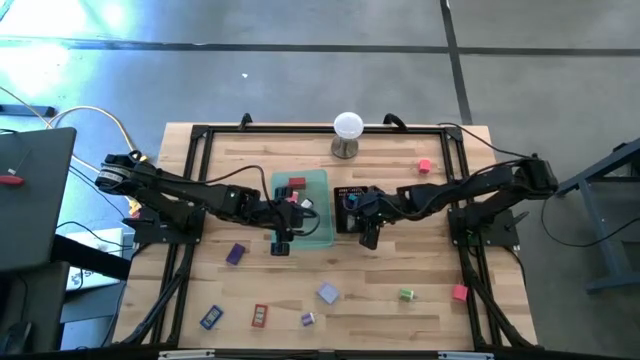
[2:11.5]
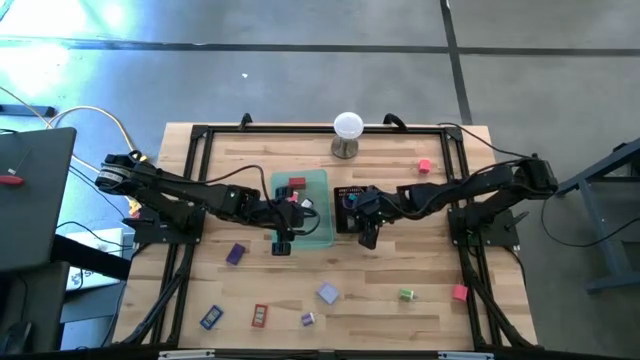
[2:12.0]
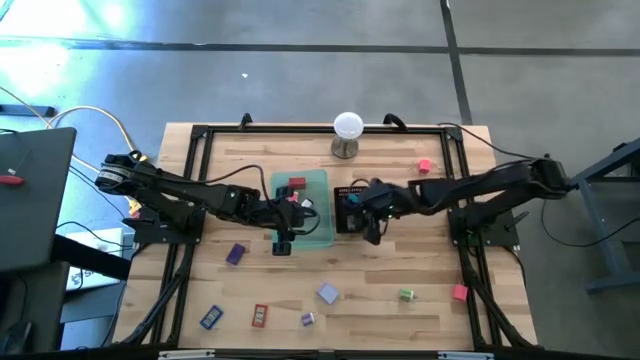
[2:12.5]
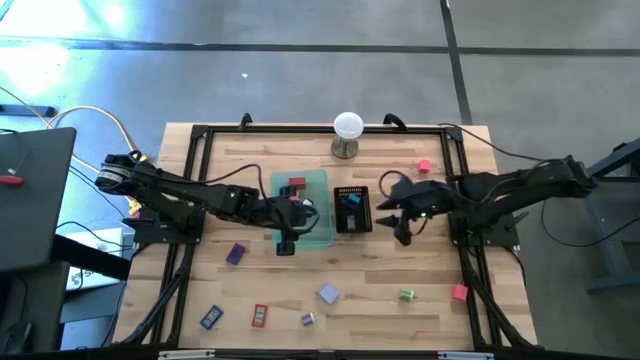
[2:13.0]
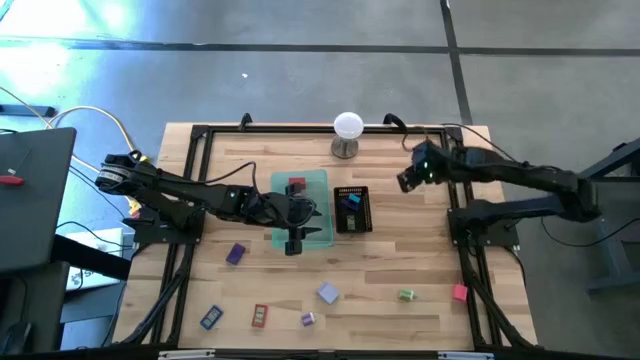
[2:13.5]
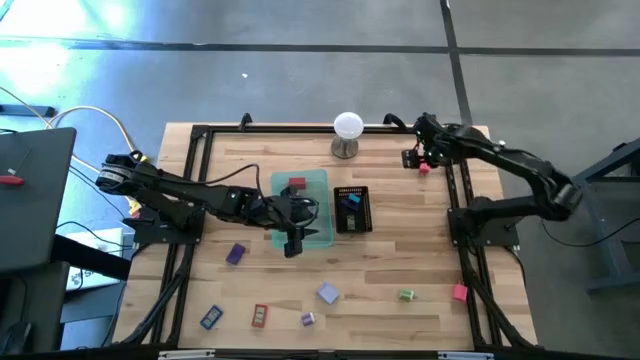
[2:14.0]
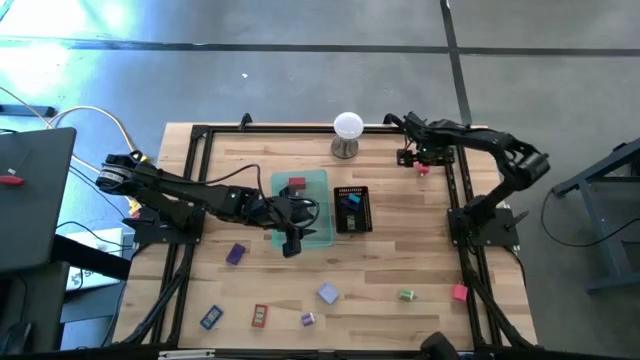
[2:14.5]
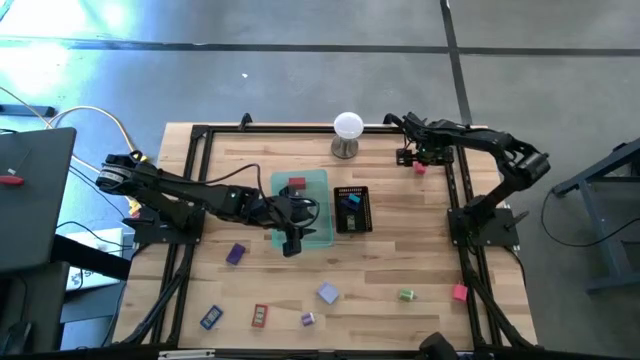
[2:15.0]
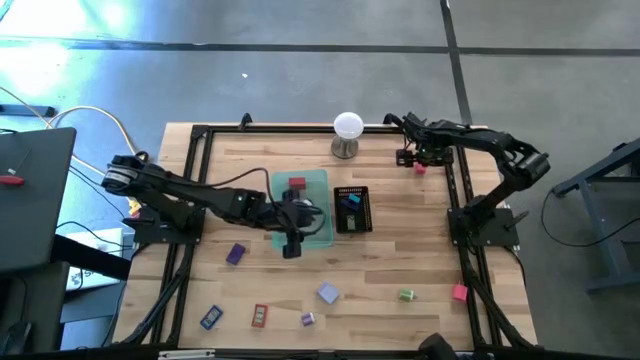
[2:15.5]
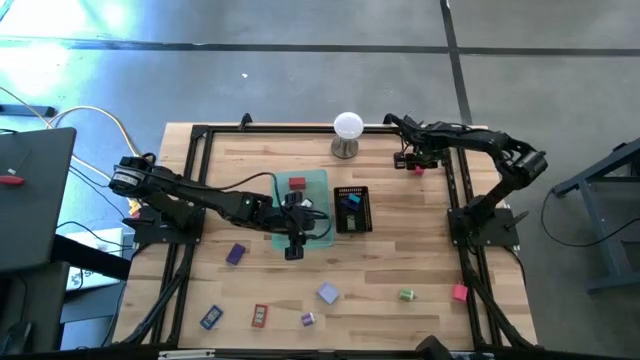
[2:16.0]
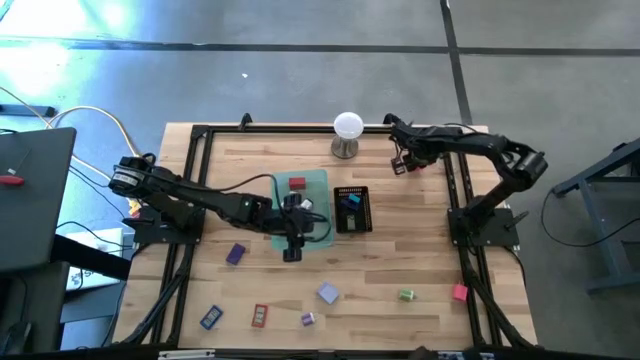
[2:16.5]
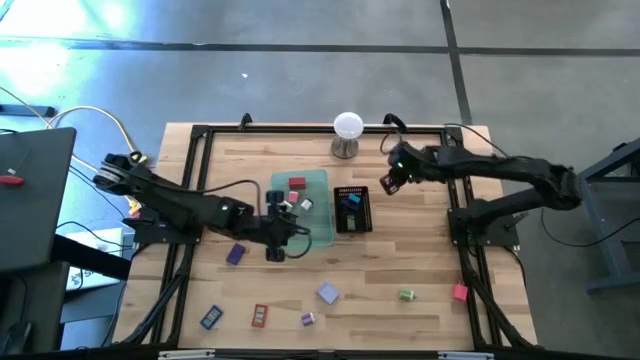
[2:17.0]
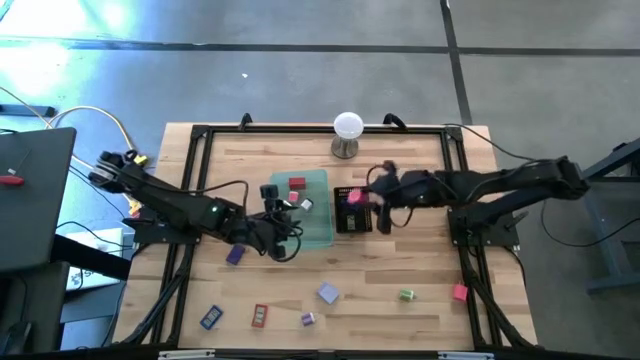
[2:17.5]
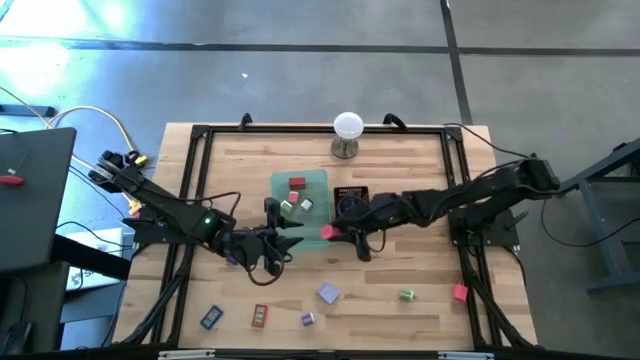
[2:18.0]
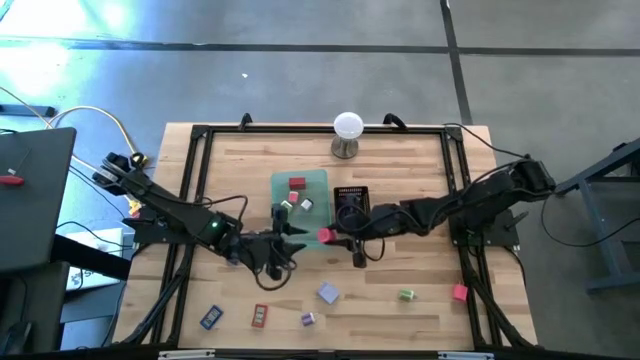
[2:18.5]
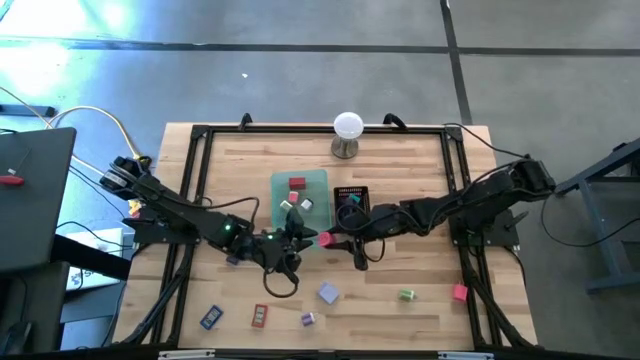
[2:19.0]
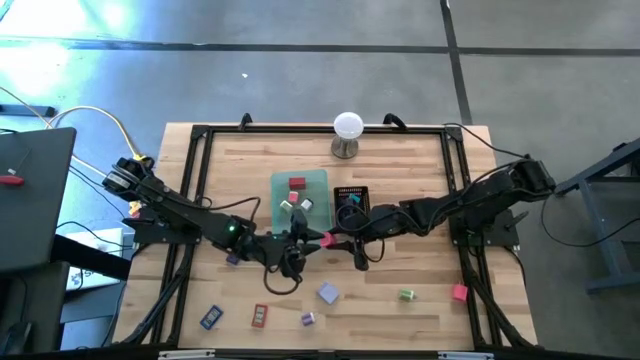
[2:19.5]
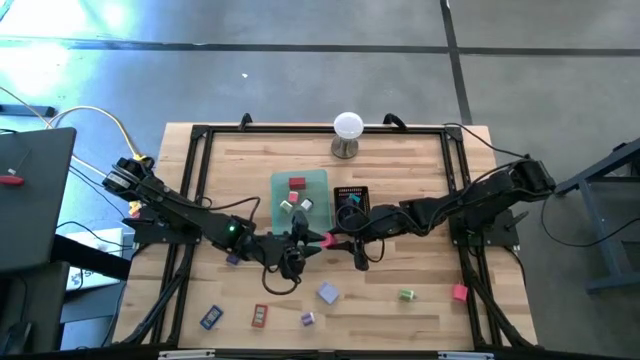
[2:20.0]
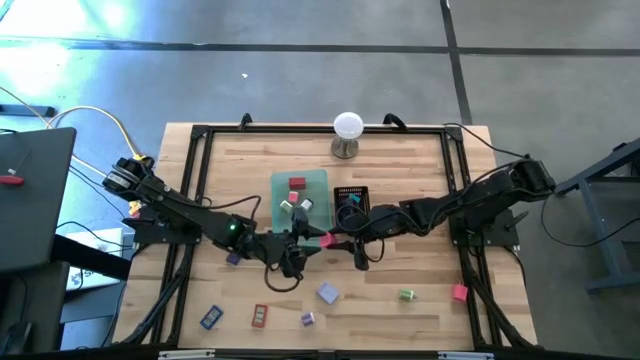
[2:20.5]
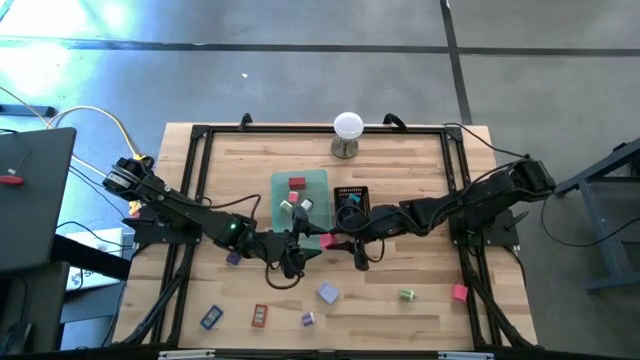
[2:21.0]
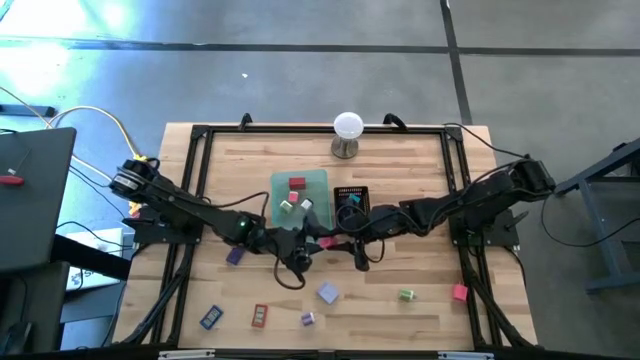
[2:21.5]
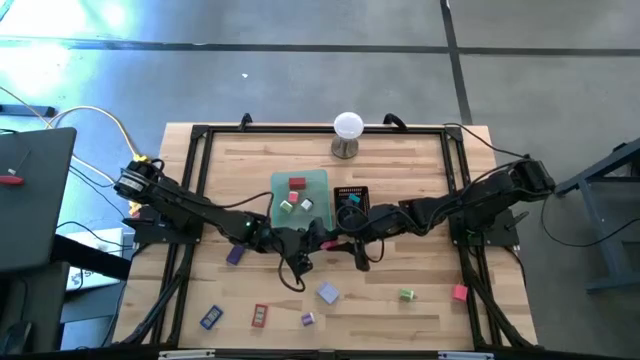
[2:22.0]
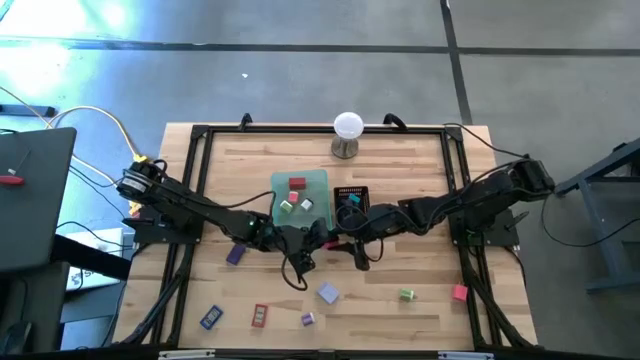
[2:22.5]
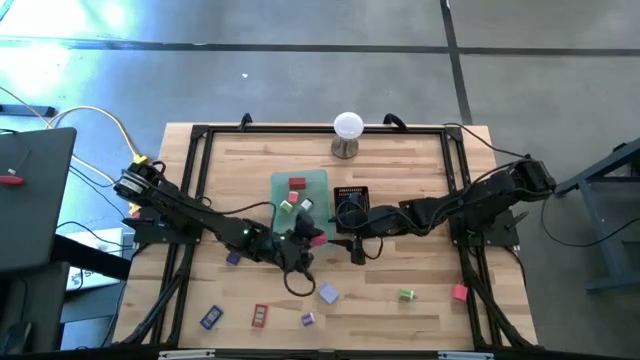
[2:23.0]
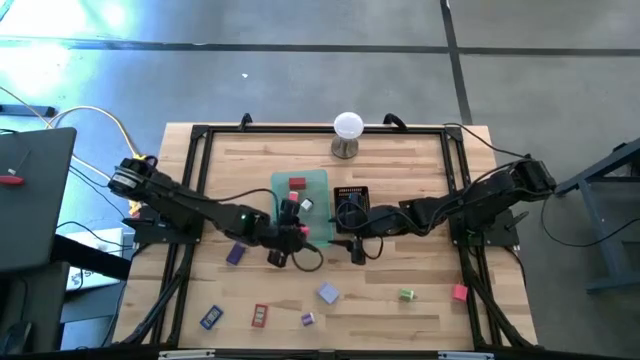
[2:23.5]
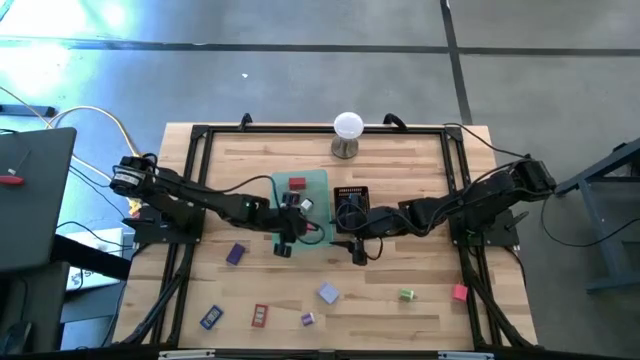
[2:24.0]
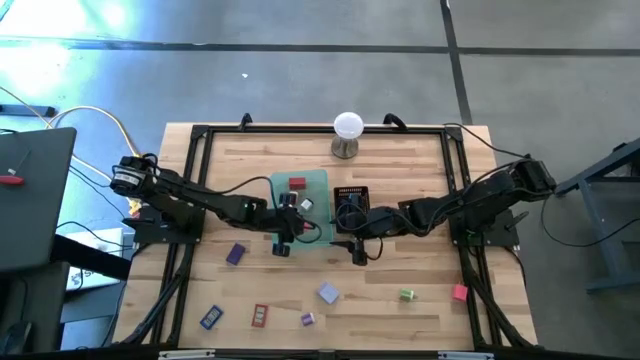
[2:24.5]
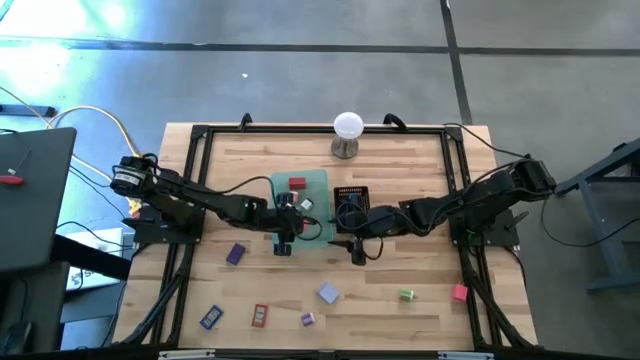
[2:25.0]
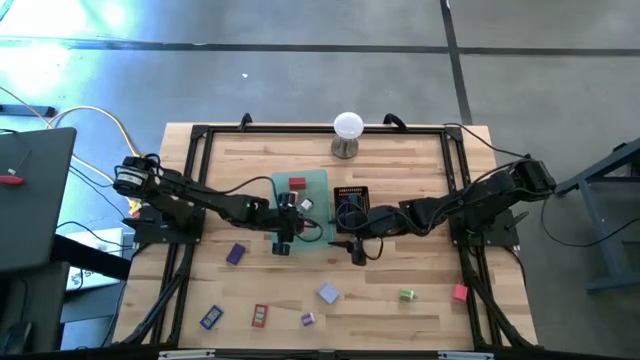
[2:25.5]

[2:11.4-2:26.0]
Task: Pick & Place Office items
Put the pink charger adapter into the blue bin

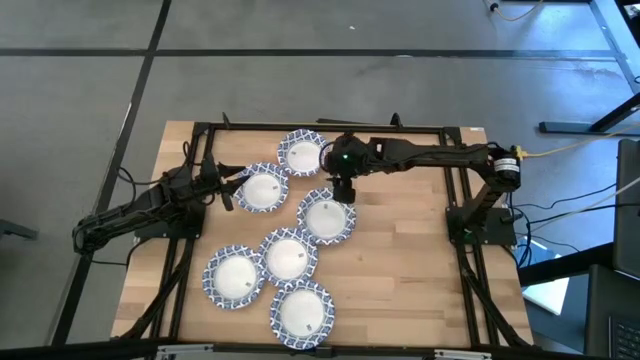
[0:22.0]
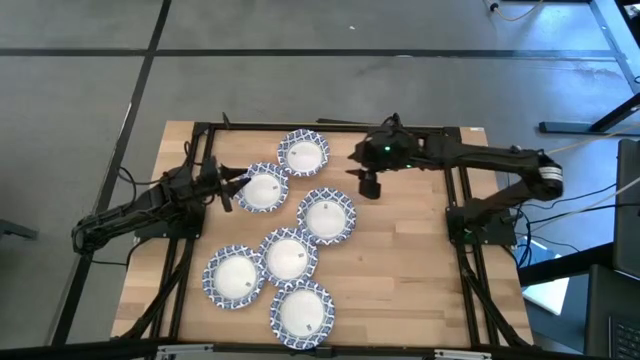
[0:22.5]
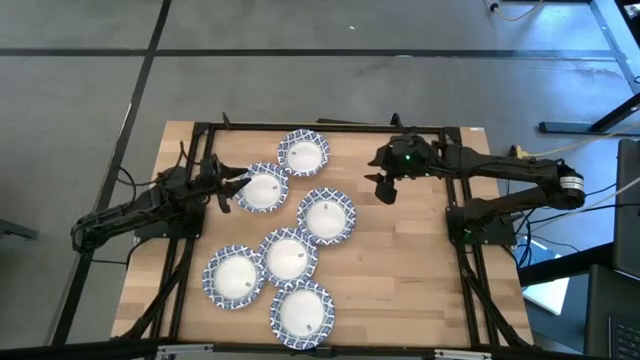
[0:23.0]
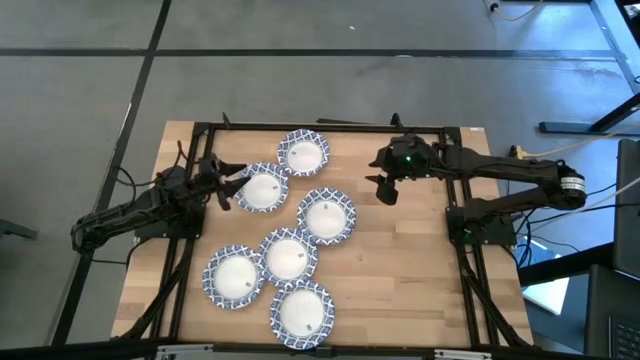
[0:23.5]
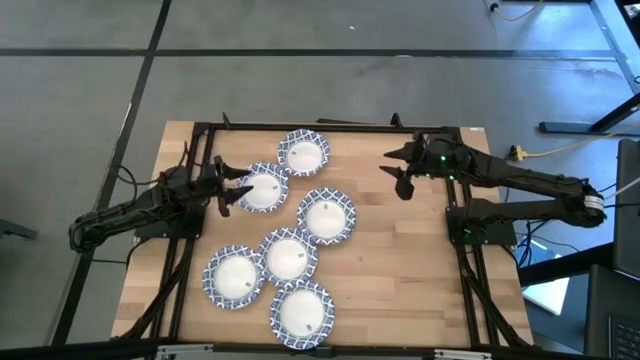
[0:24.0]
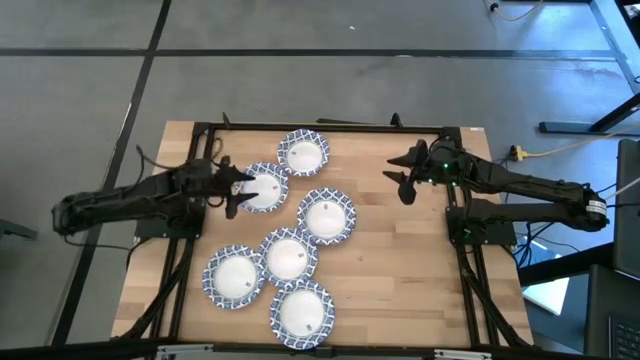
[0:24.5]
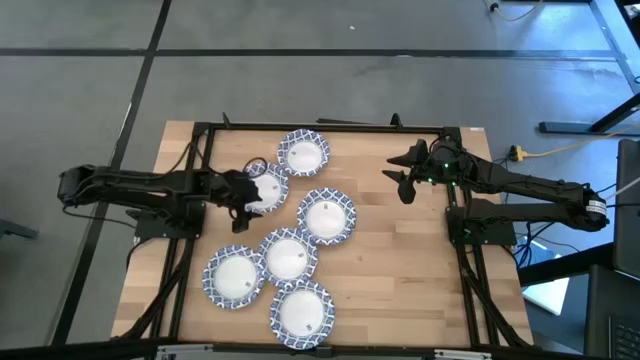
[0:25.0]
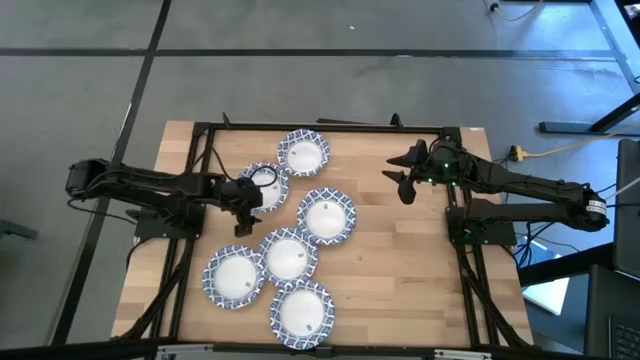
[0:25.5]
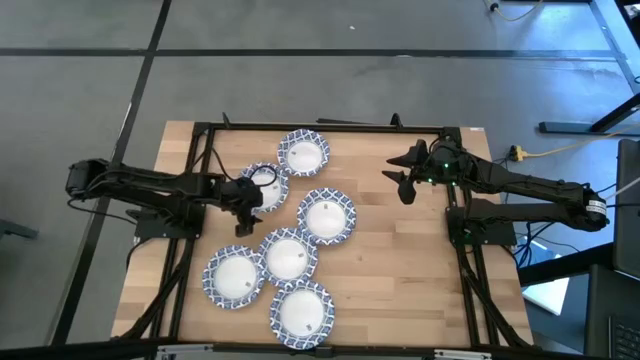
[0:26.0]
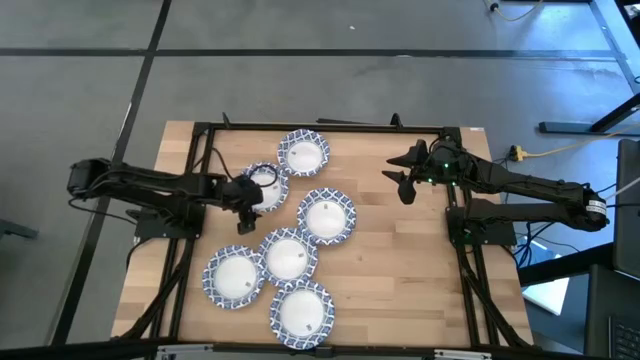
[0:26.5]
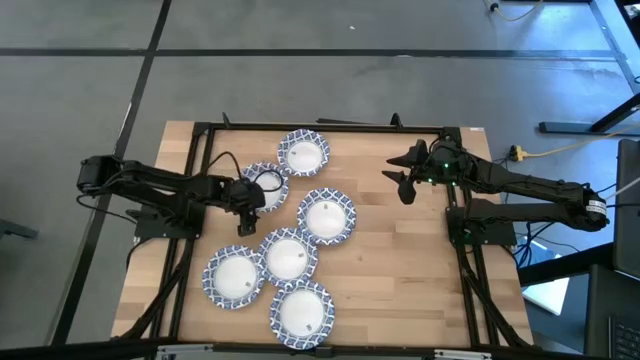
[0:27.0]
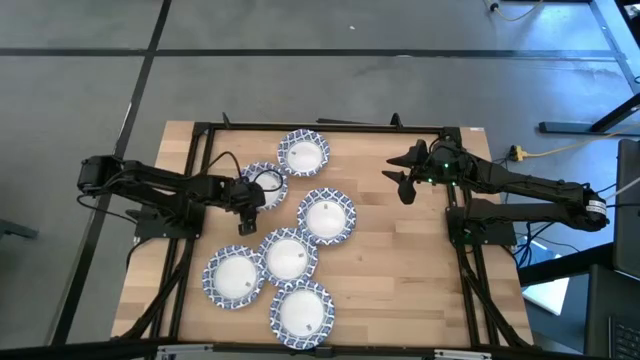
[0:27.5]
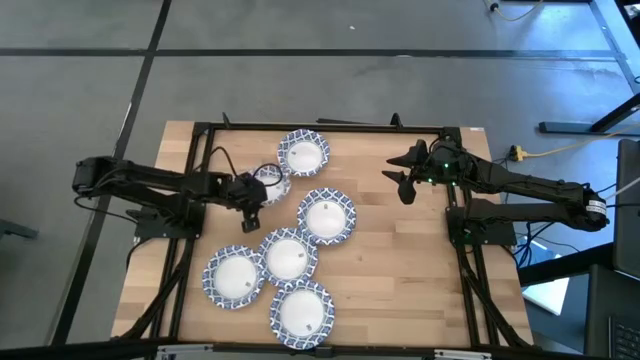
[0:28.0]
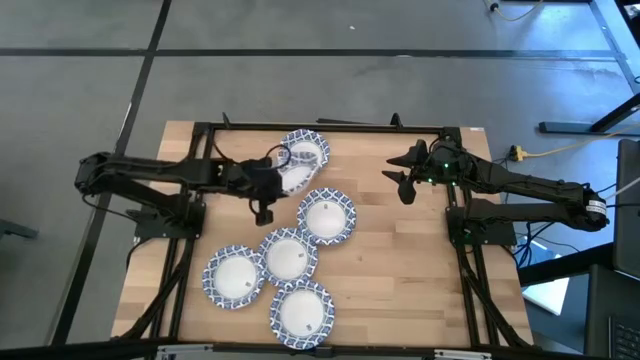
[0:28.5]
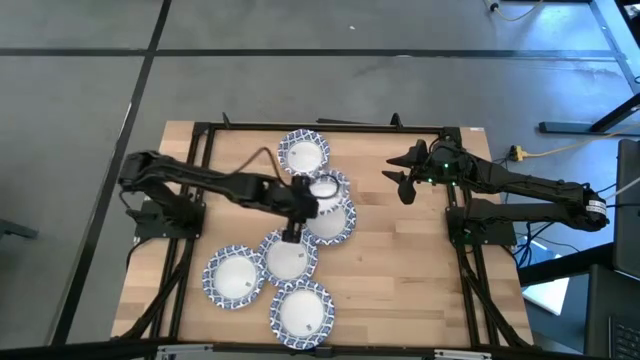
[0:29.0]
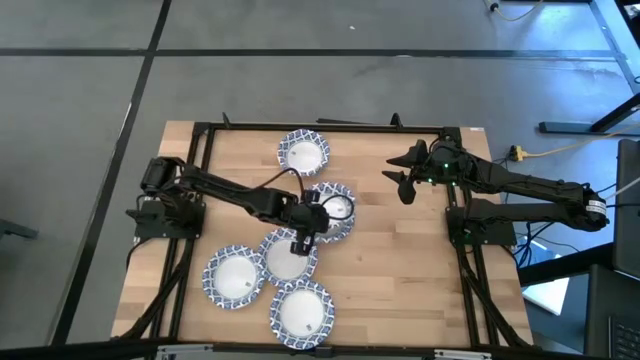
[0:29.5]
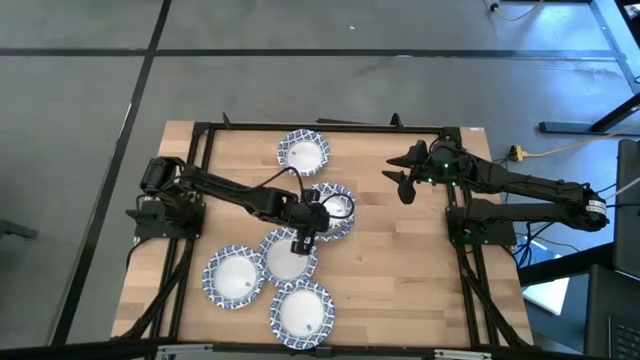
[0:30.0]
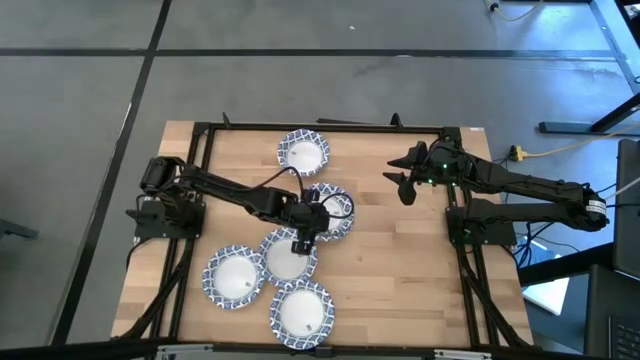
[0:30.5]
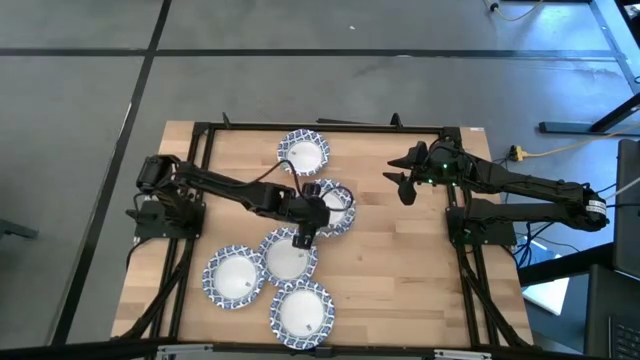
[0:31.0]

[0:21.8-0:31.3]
Task: Nest bowls inside each other
Stack the blue patterned bowl on the stacked blue patterned bowls
